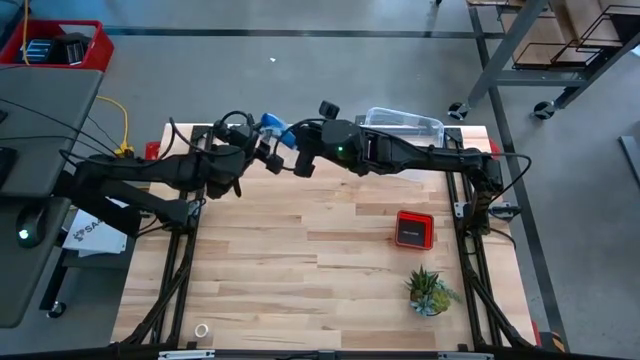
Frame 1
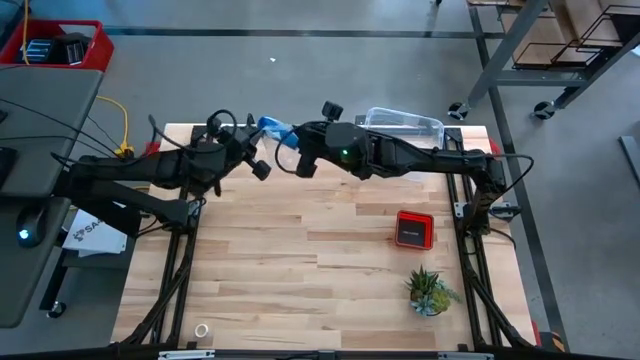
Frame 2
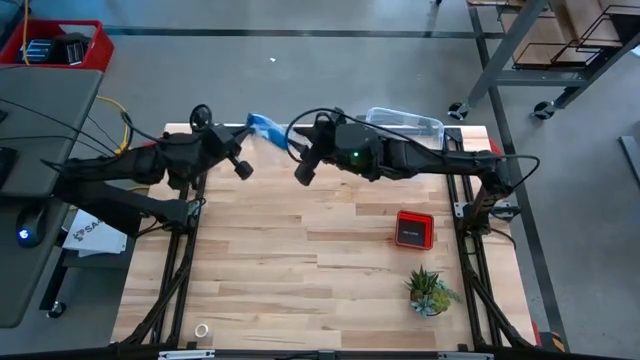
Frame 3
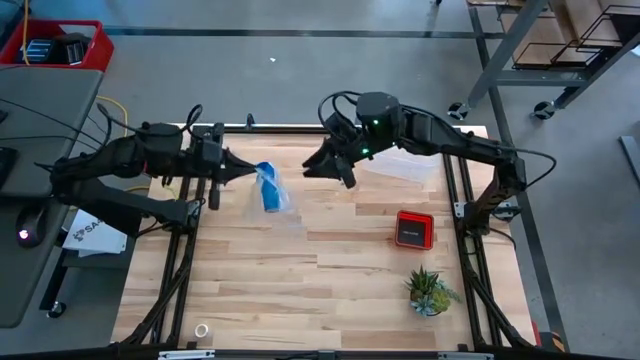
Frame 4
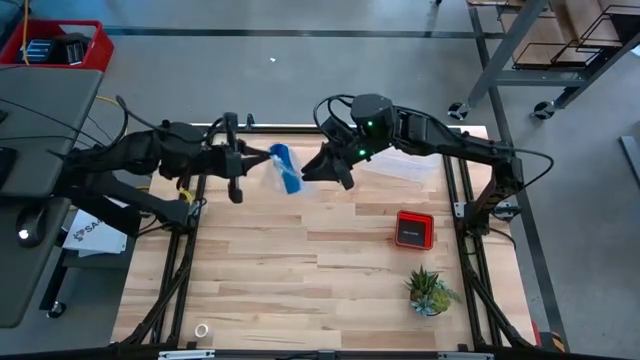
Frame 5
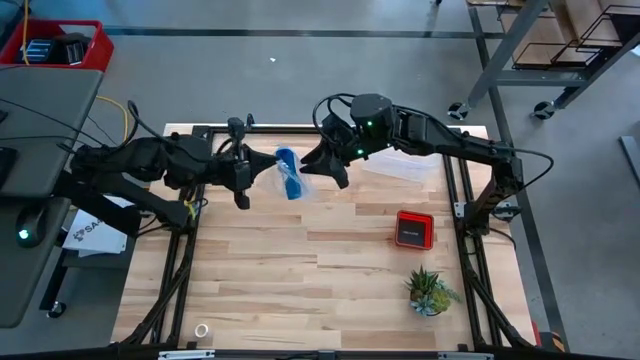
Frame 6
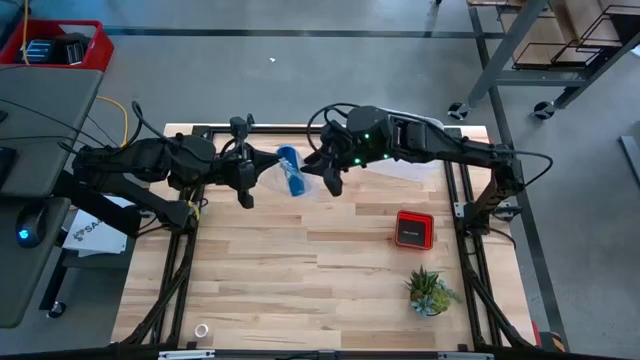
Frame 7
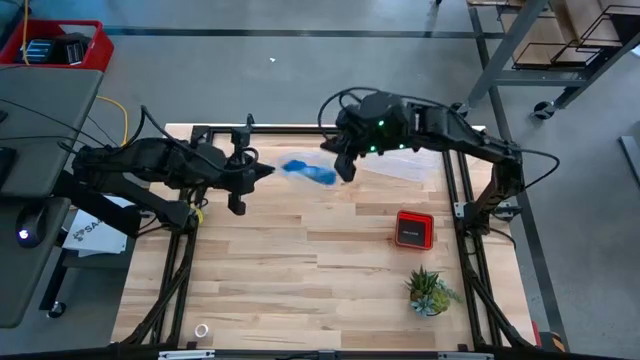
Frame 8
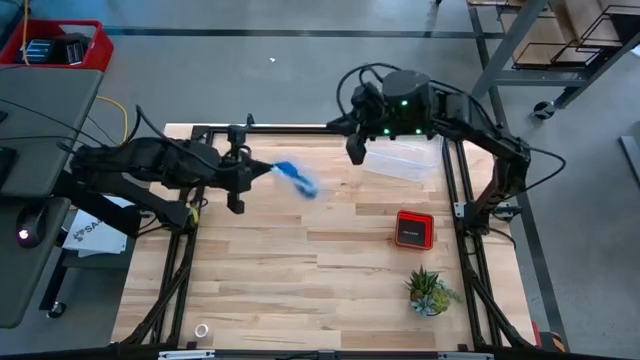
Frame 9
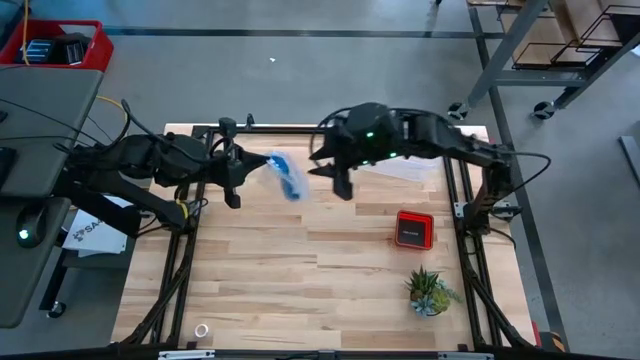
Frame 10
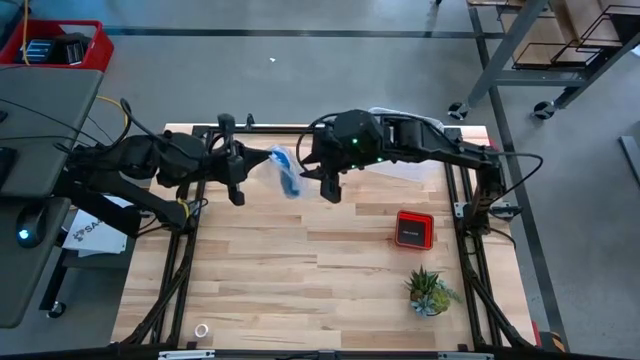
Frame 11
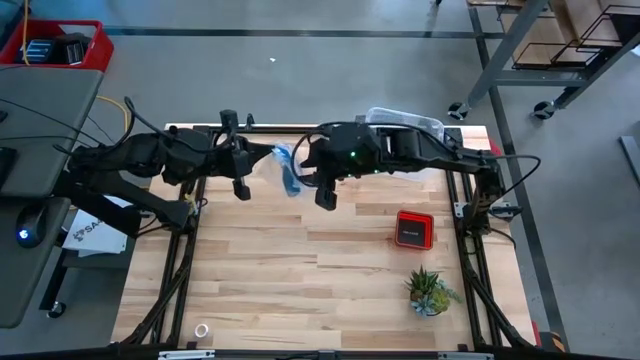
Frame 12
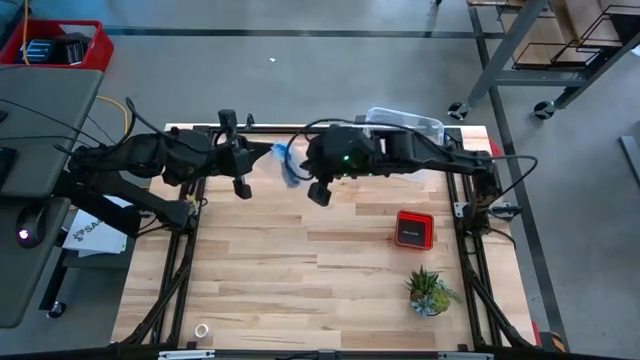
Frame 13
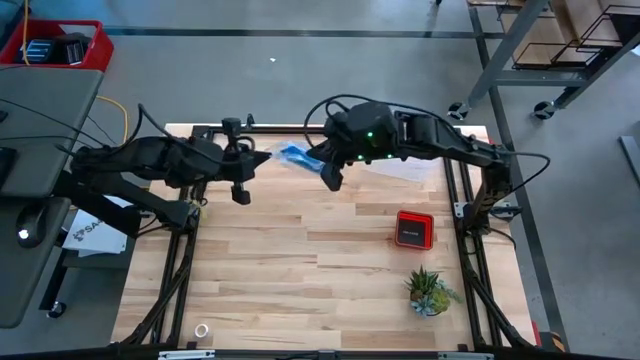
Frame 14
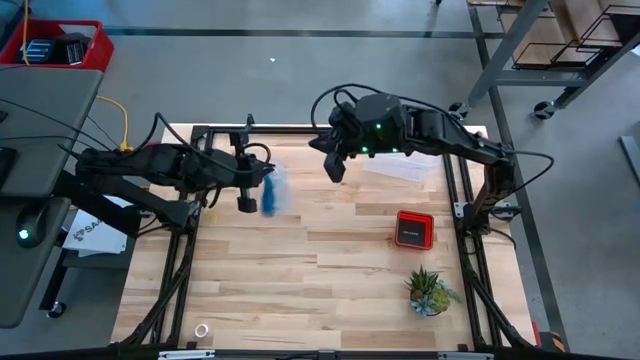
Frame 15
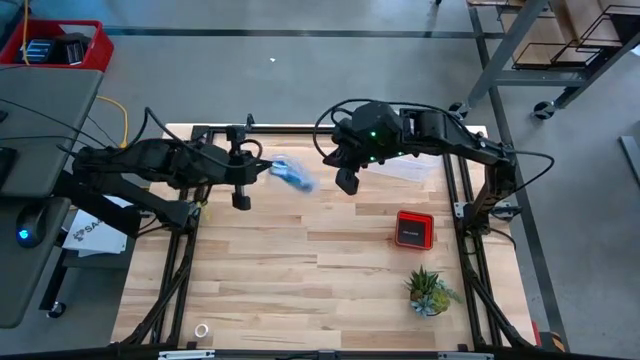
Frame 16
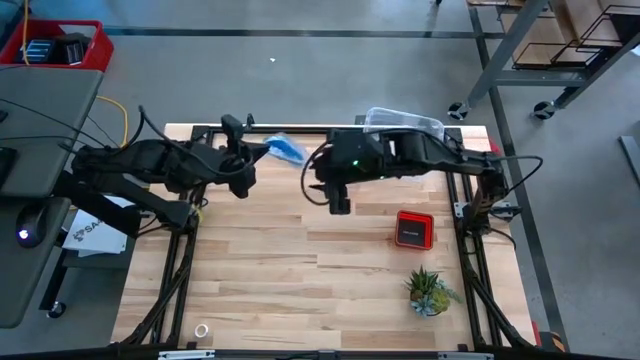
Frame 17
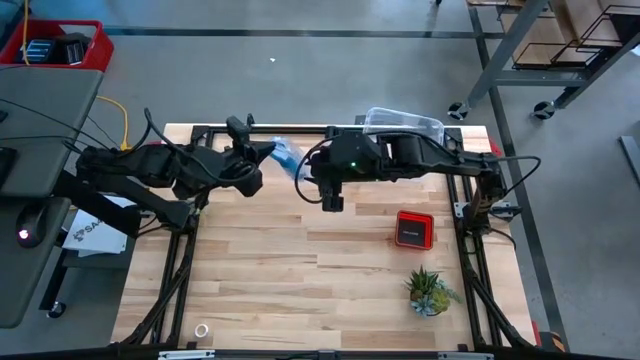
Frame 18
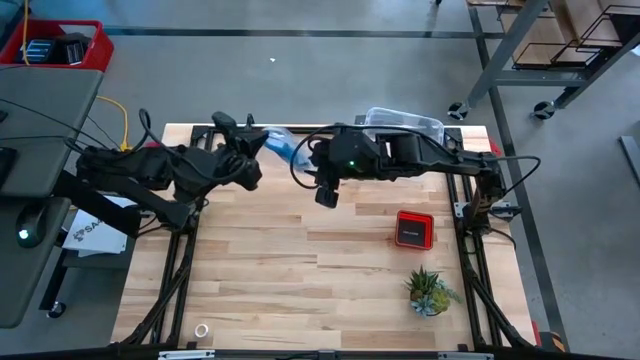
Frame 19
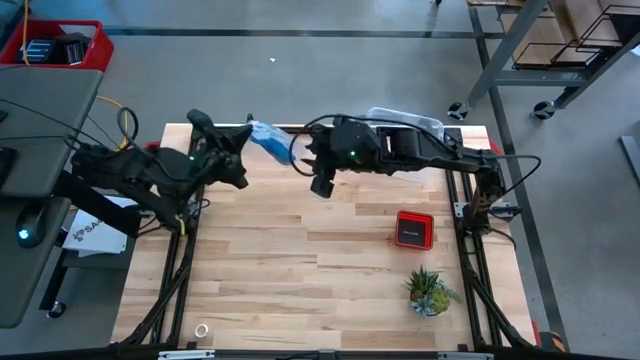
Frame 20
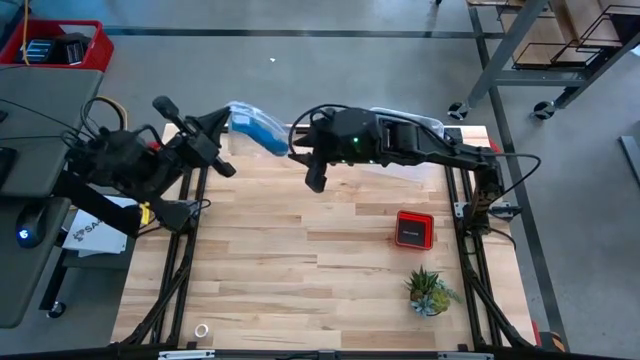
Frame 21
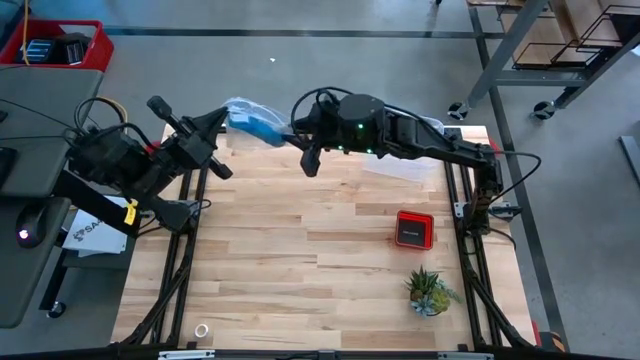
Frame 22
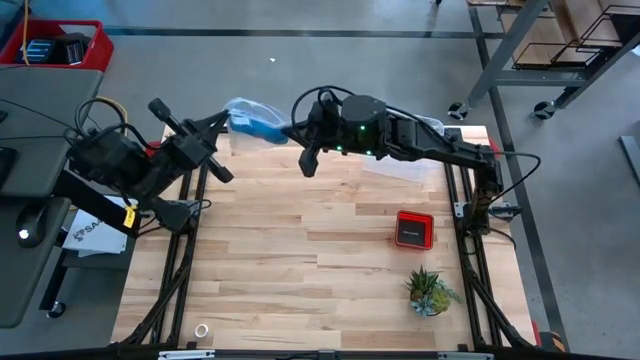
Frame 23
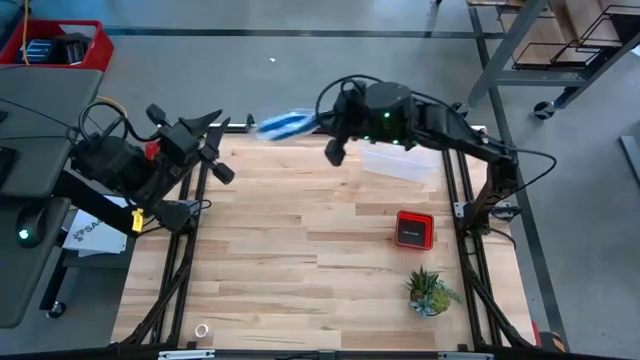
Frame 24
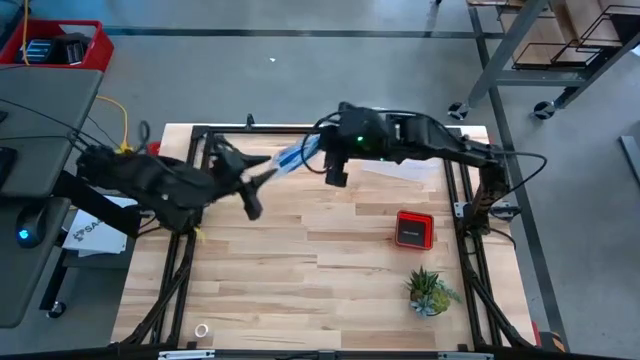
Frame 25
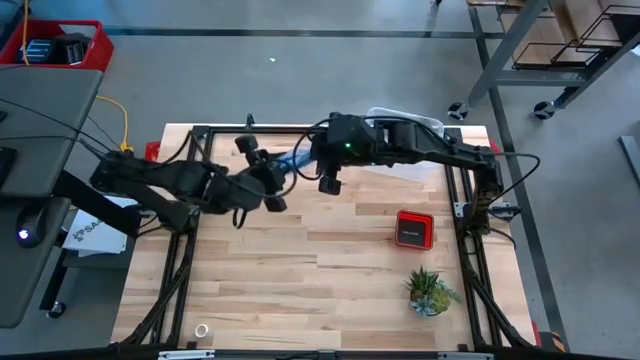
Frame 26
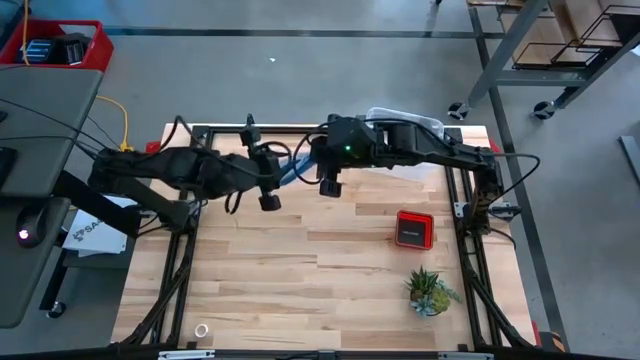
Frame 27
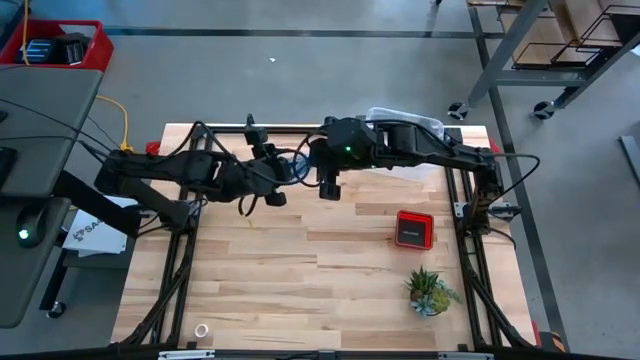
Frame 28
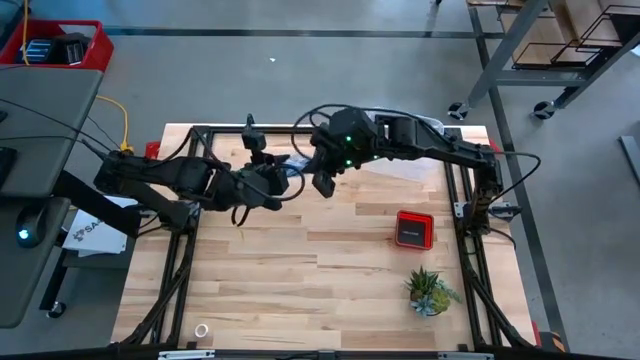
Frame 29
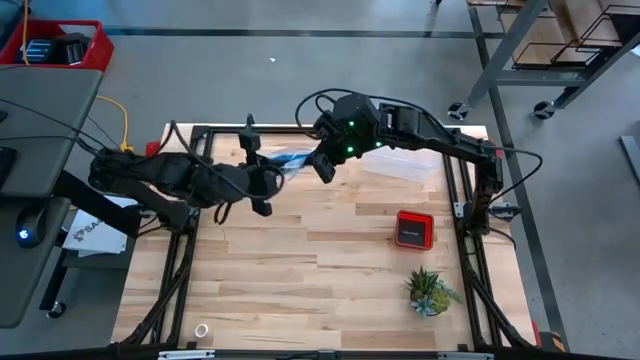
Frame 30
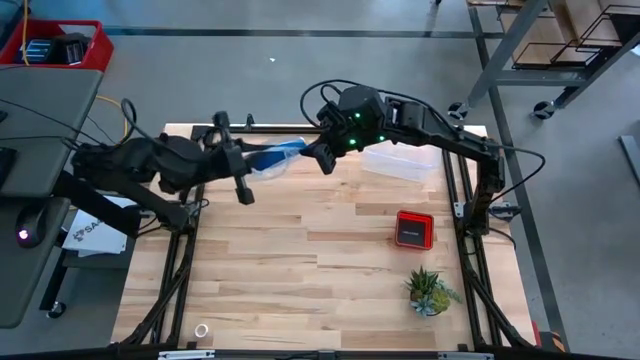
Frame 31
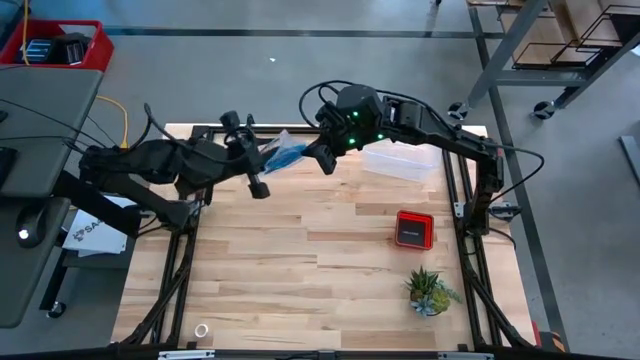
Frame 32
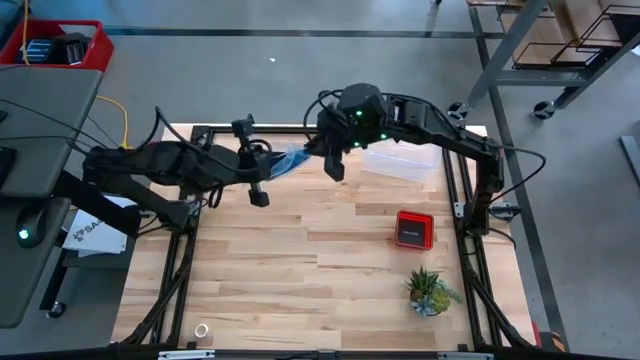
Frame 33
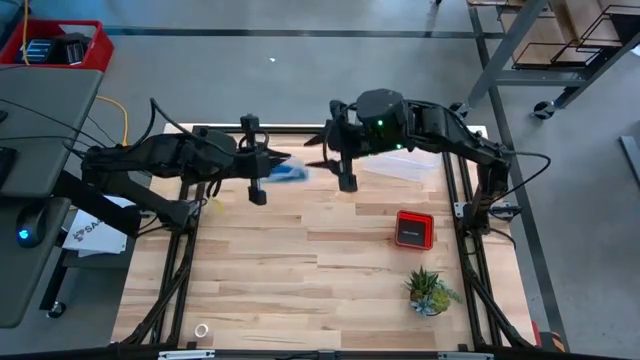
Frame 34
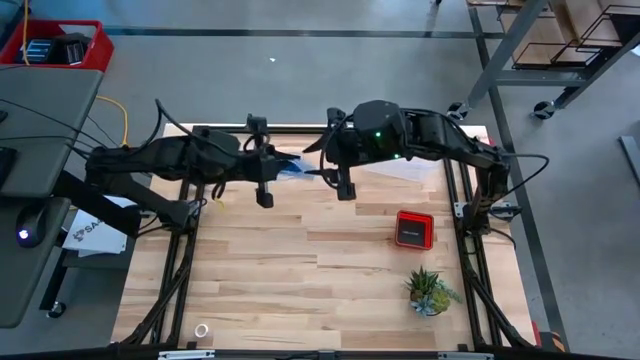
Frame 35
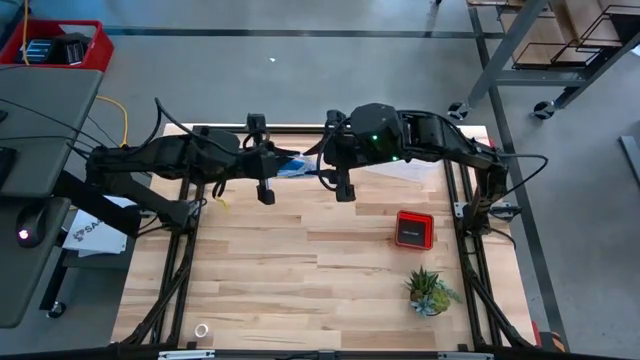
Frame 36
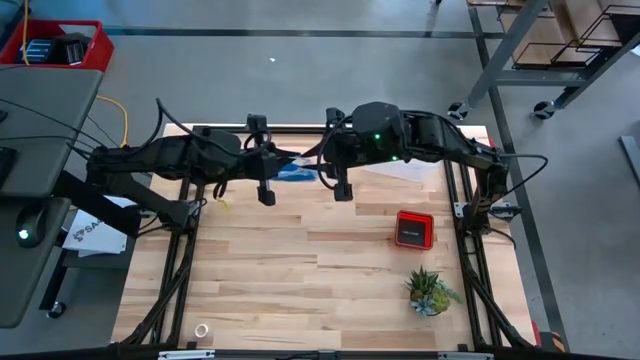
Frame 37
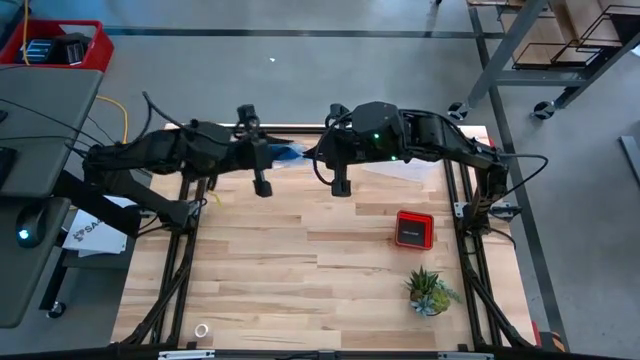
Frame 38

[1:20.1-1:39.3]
Task: Roll bandage
Put the rolled blue bandage into the transparent zip bag

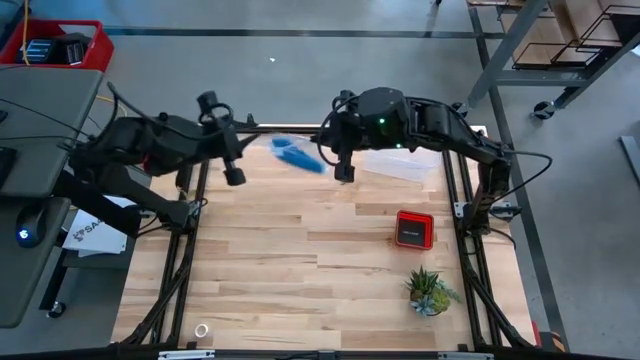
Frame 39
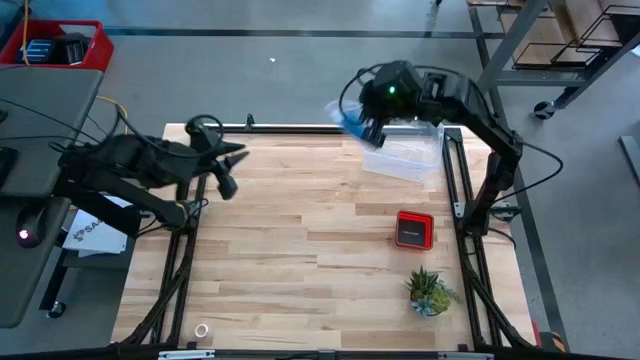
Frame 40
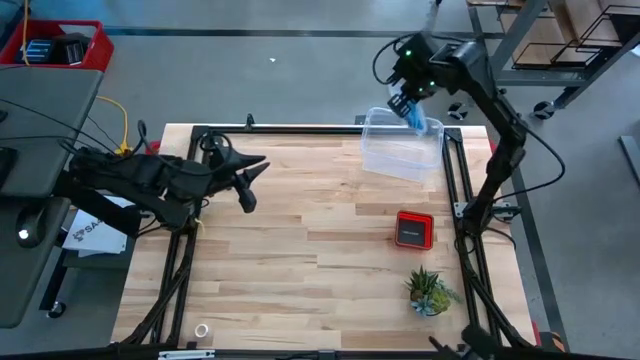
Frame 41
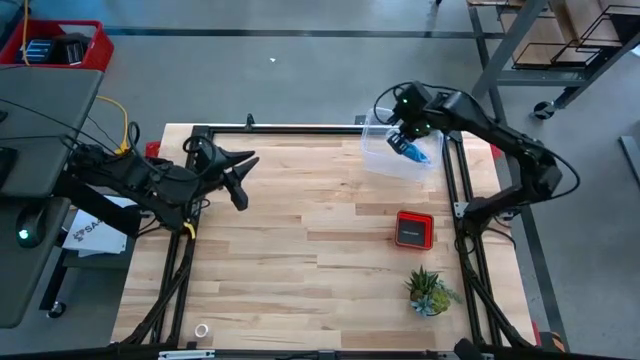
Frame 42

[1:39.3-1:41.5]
Put the transparent zip bag into the transparent container
